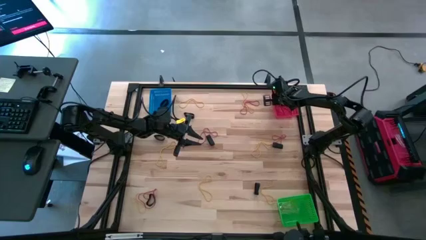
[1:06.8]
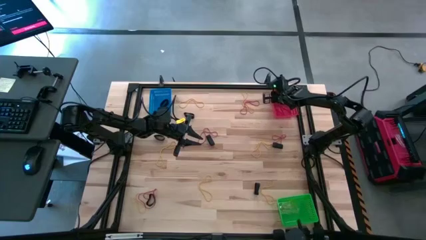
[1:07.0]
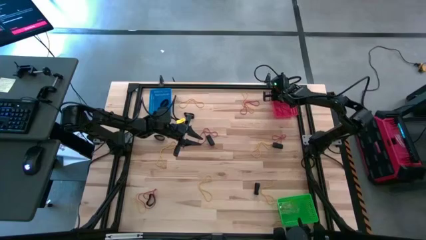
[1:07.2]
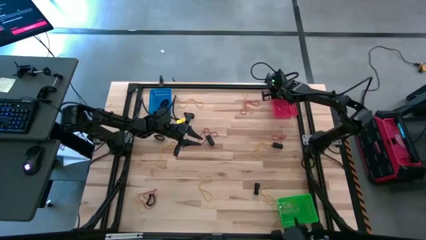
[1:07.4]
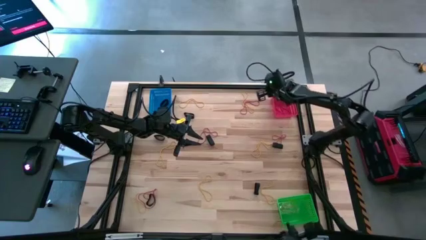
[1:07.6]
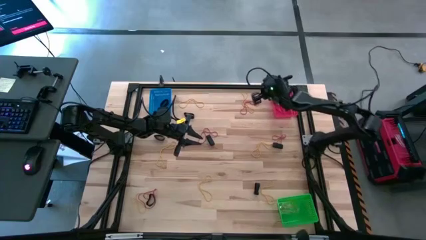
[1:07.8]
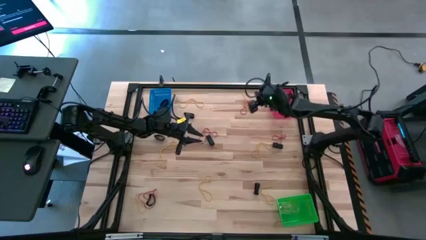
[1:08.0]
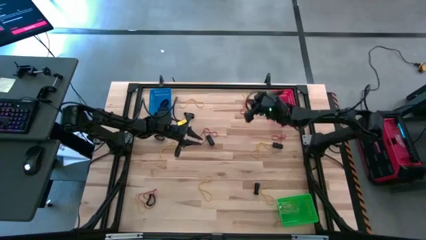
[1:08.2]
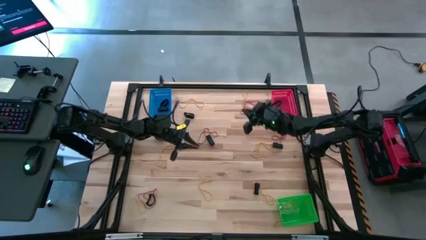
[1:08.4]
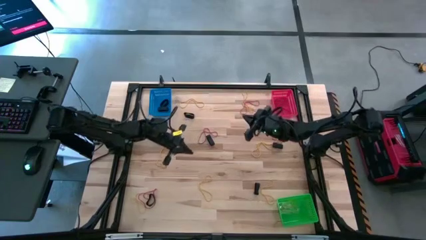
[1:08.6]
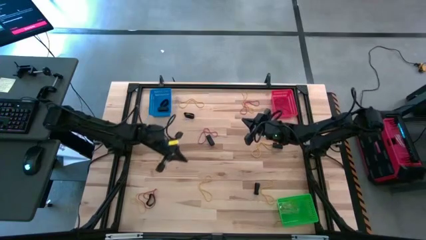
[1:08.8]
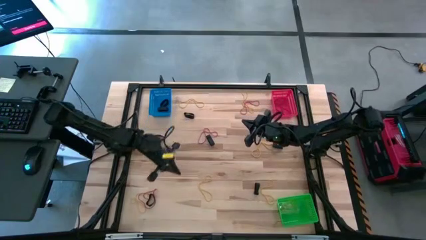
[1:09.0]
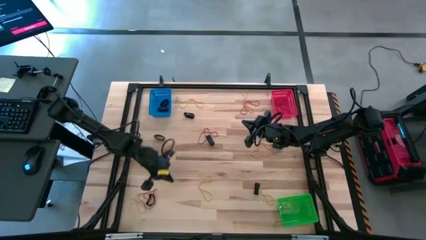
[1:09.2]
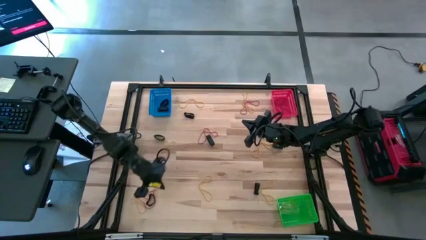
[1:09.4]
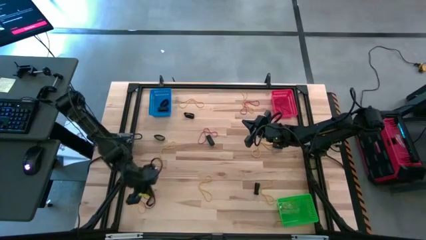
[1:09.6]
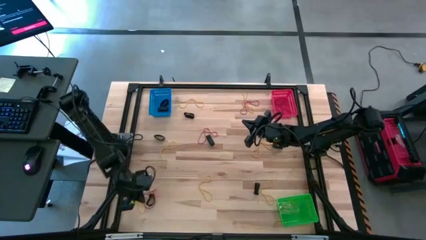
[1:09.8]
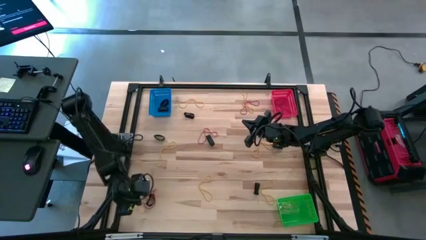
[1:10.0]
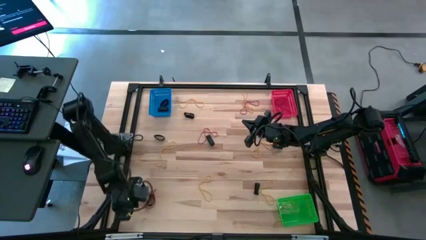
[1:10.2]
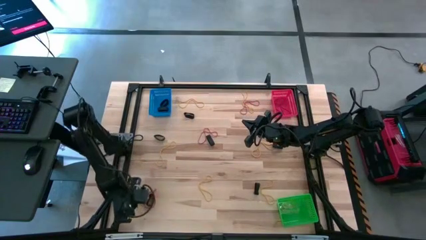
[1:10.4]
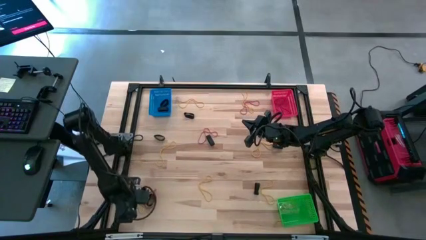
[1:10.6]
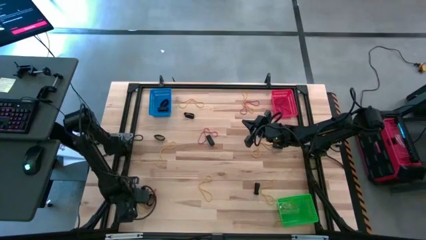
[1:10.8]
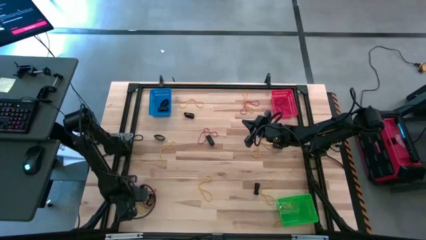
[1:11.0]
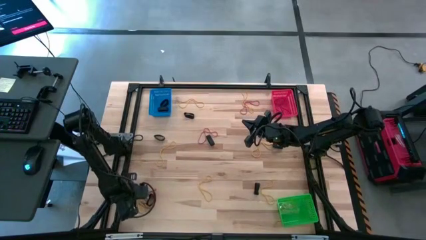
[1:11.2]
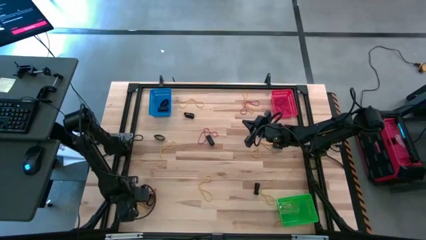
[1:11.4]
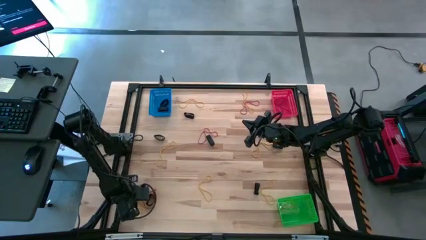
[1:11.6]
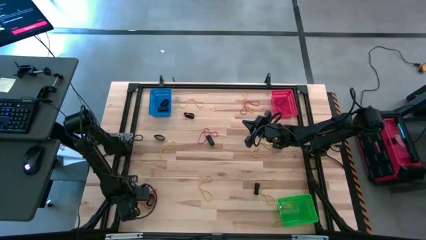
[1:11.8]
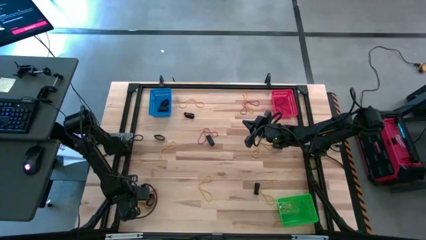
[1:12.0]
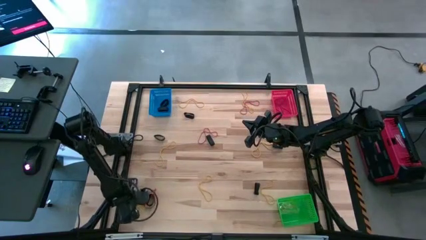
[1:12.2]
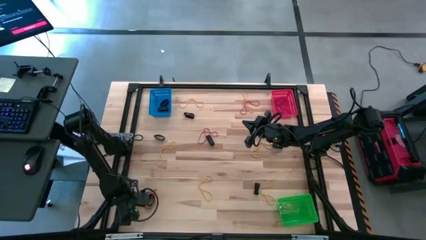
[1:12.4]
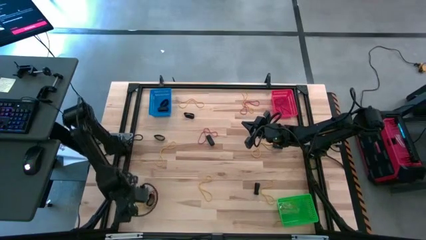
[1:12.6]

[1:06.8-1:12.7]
Task: Sort rubber bands into baskets
Put the yellow rubber band into the green bin

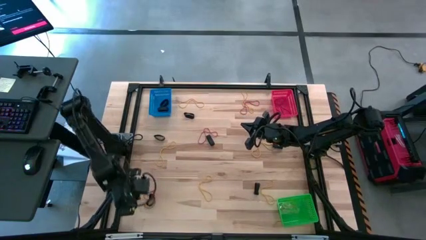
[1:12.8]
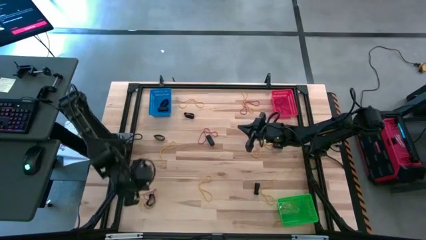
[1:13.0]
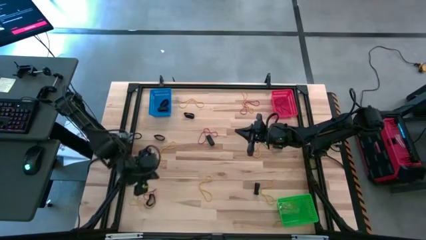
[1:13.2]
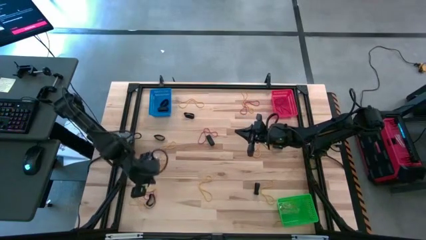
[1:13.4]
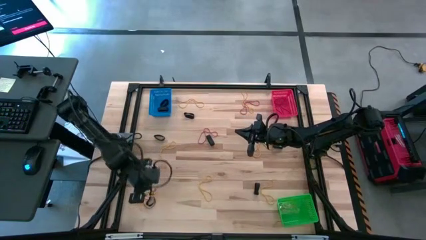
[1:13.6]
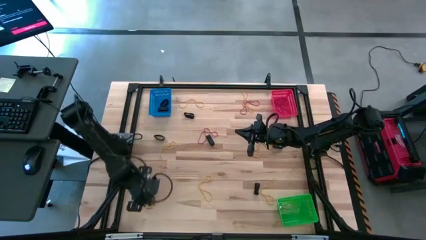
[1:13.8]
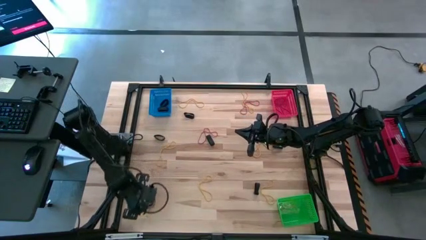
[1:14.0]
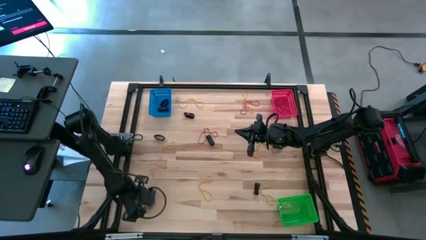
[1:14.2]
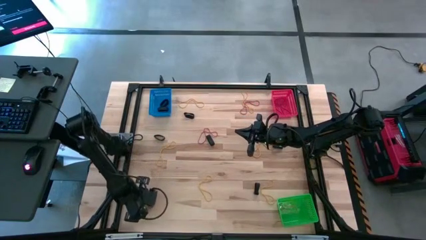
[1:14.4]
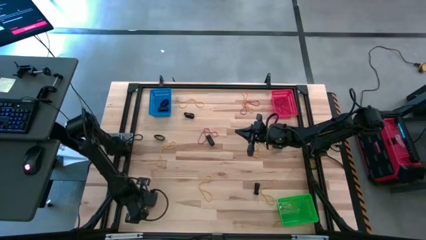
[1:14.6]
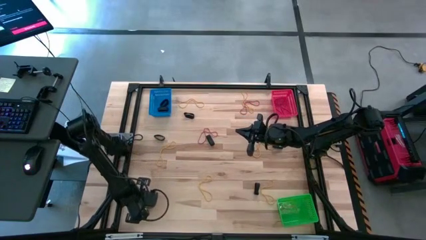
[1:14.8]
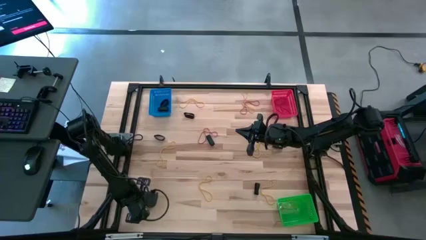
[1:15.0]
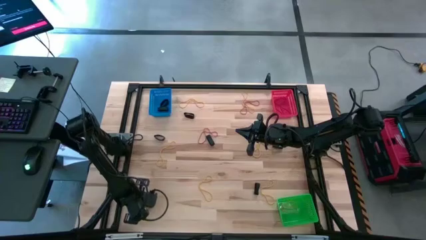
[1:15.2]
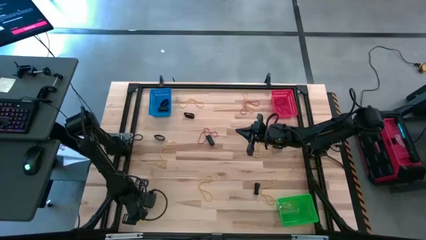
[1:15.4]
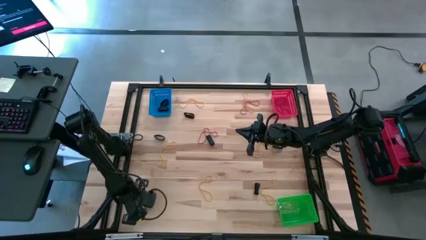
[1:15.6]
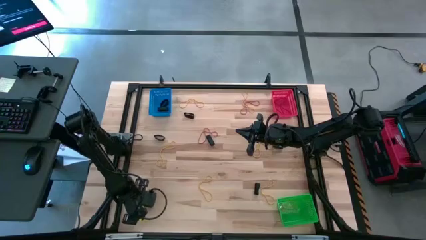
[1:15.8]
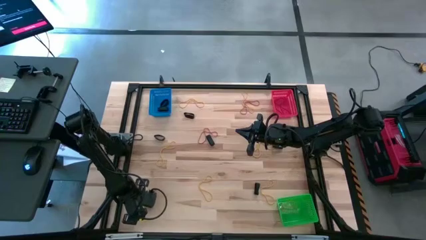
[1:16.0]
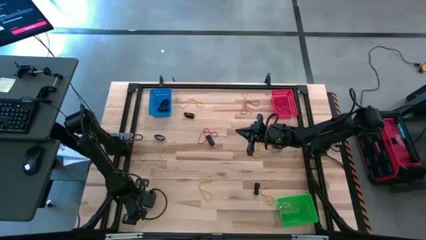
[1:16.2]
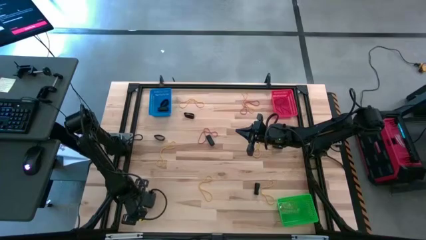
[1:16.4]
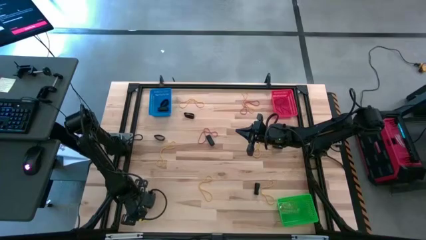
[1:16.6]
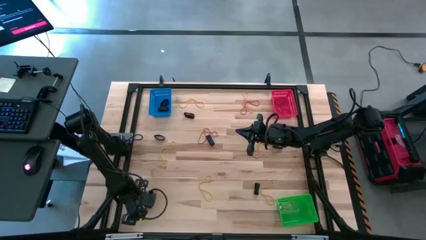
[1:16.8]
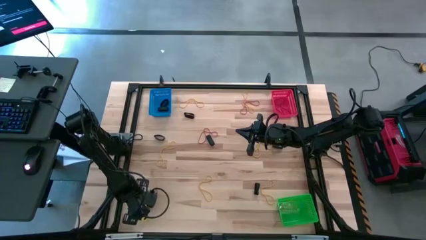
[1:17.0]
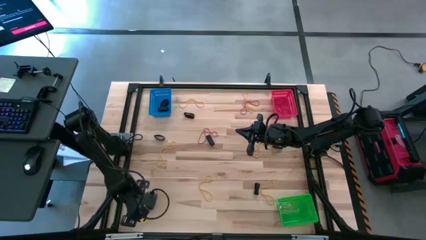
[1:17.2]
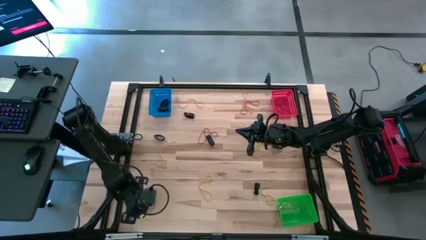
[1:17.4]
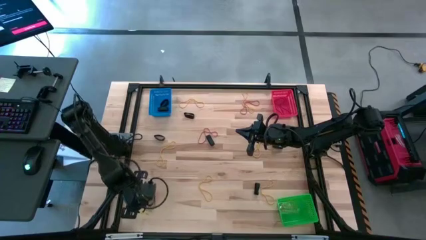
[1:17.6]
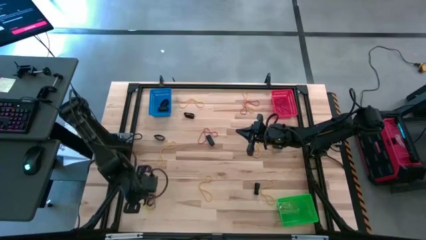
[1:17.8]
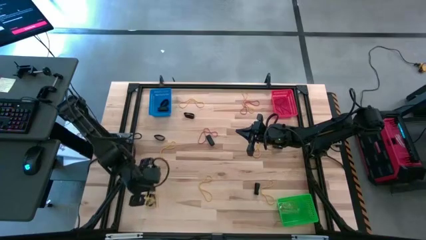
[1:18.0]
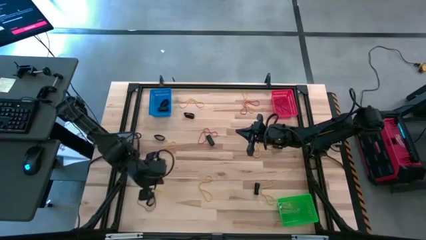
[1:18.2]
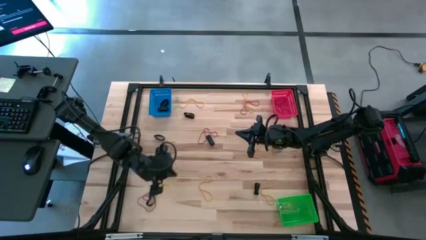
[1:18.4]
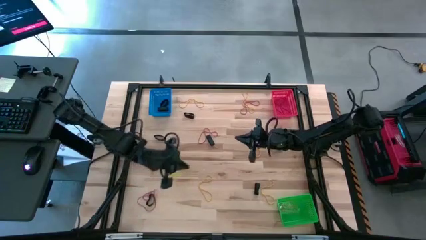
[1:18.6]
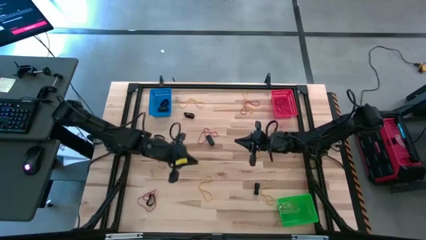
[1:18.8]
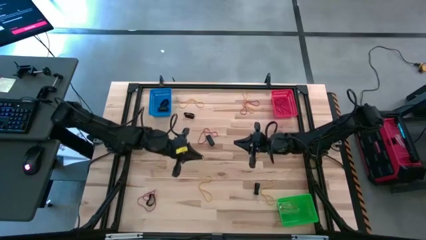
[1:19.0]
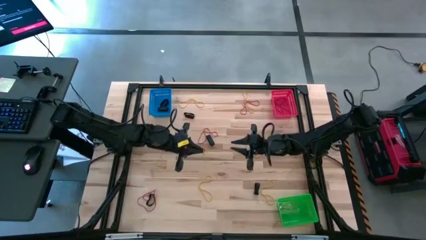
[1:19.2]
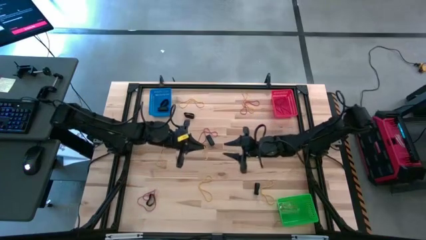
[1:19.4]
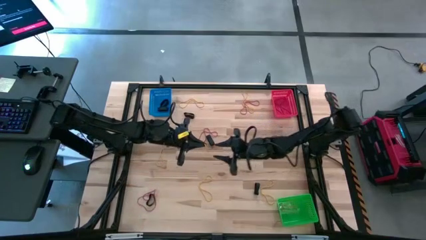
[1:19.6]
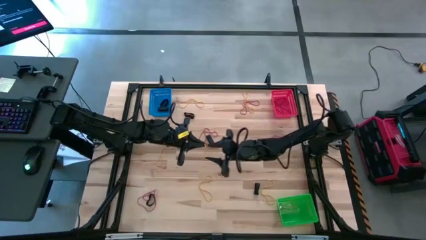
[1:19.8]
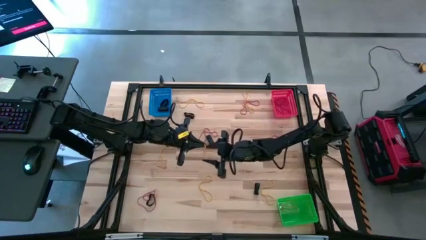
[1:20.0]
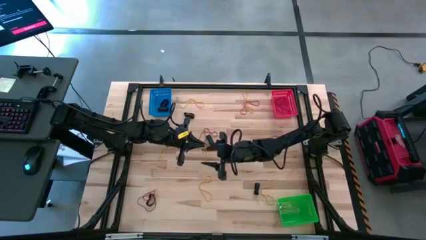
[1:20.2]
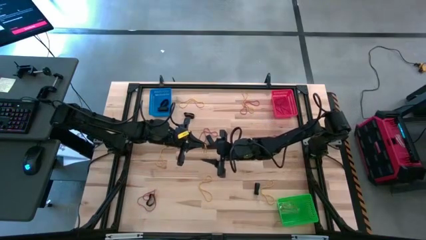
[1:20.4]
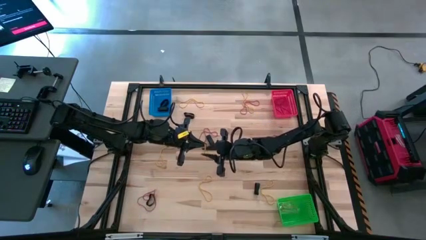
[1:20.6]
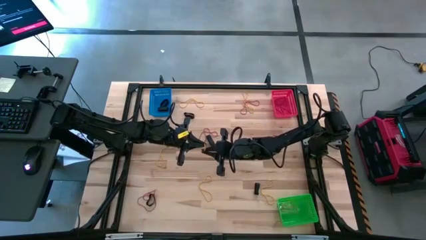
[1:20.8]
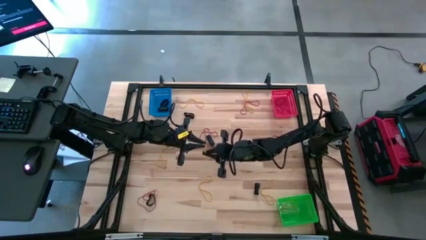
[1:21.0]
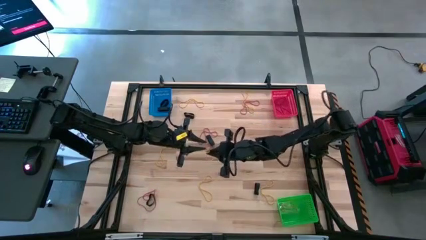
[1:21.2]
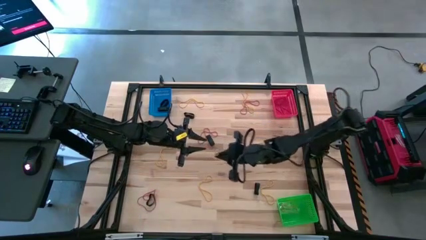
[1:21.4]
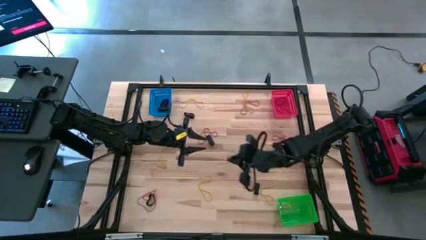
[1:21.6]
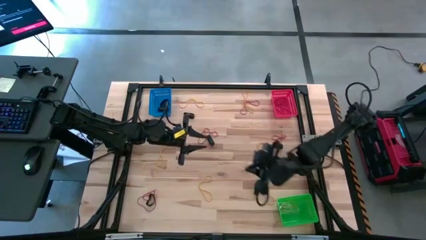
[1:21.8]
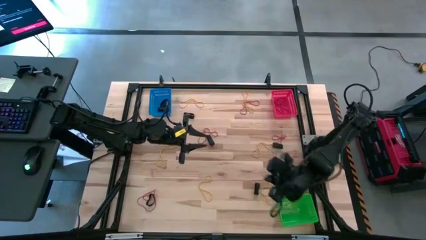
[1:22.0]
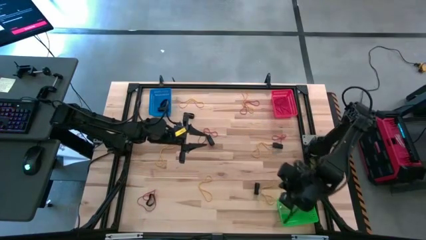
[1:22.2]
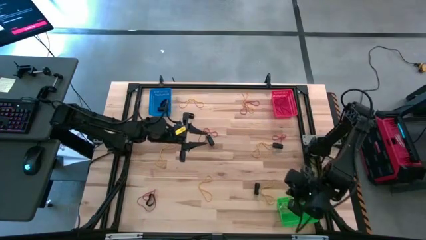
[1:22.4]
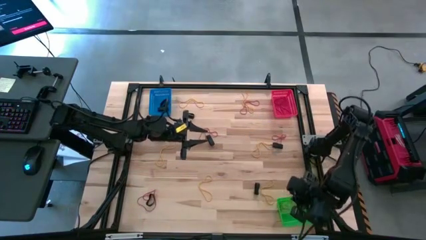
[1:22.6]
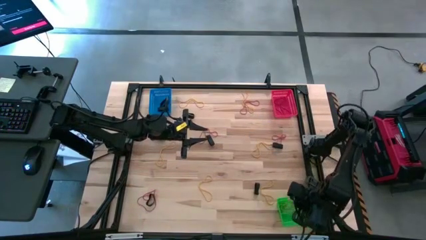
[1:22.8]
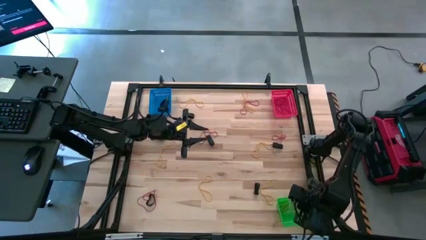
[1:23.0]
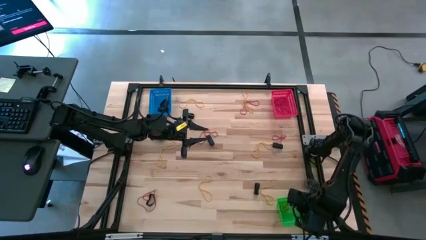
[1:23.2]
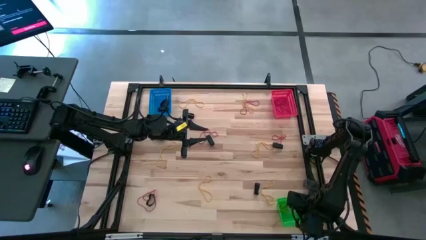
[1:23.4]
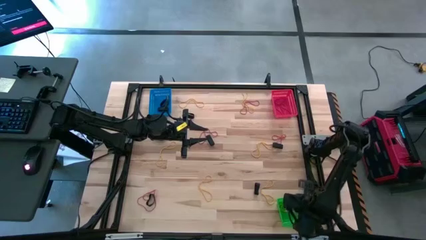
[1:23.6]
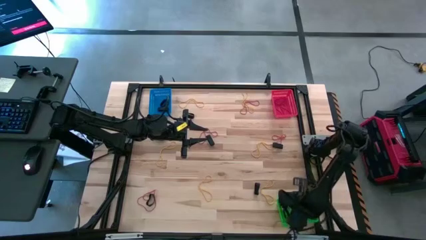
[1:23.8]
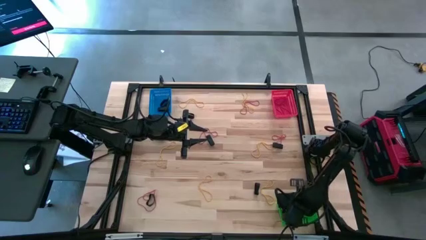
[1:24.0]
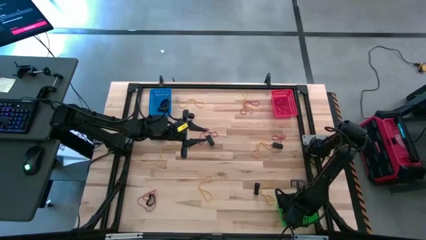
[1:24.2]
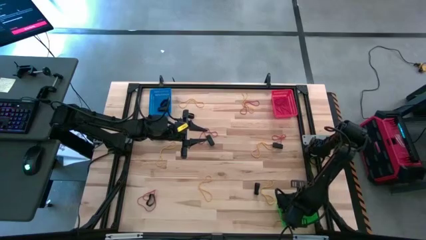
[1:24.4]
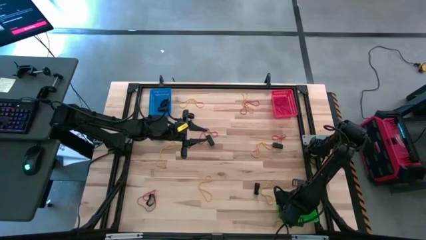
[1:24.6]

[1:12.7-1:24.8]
Put the yellow rubber band into green bin
